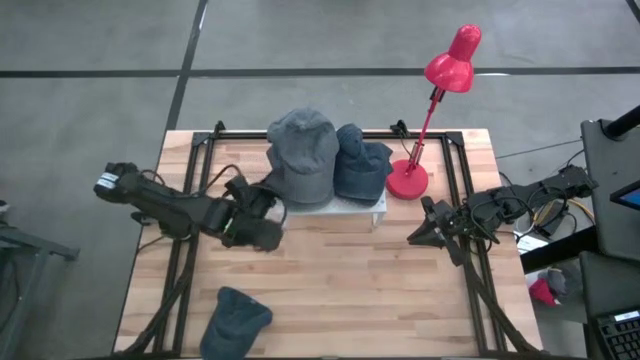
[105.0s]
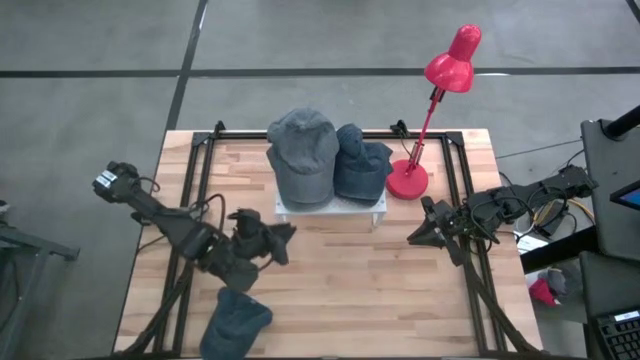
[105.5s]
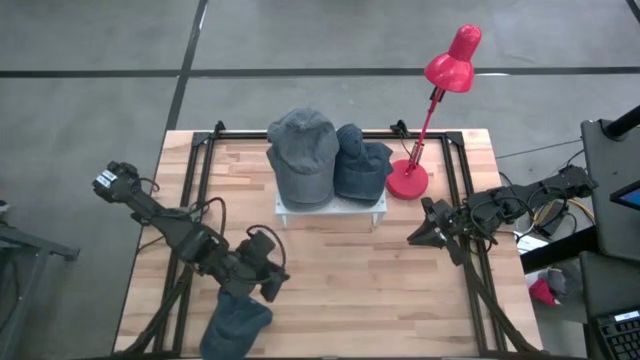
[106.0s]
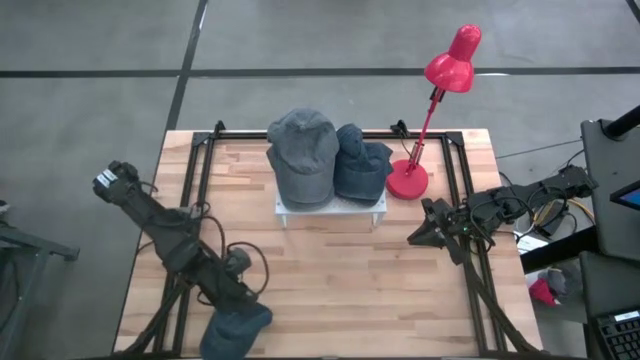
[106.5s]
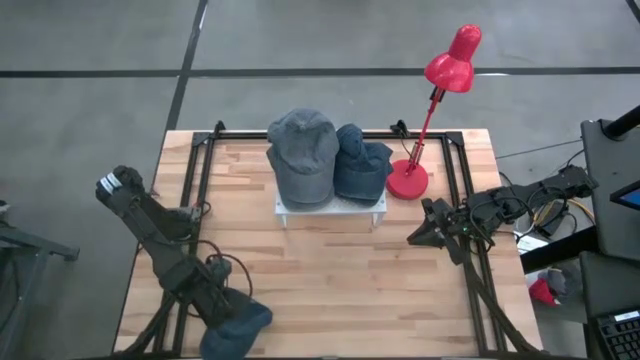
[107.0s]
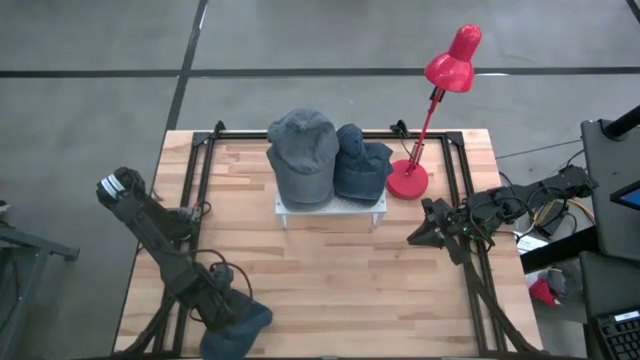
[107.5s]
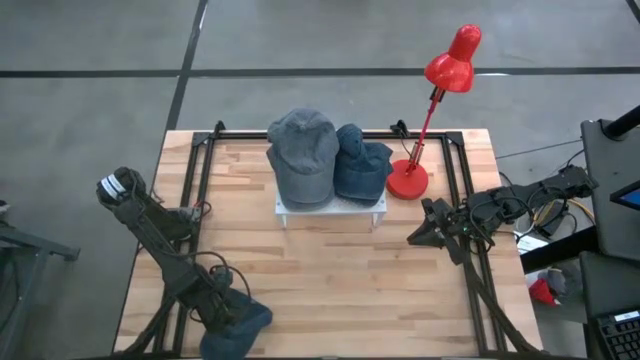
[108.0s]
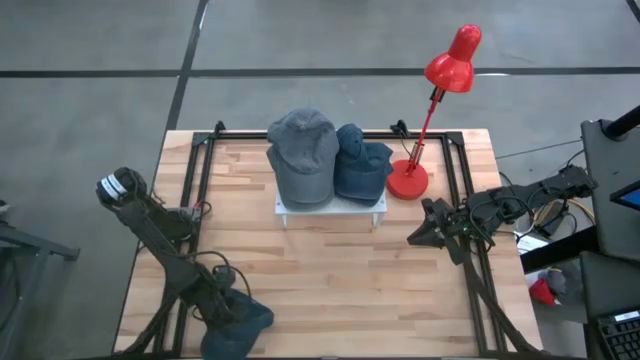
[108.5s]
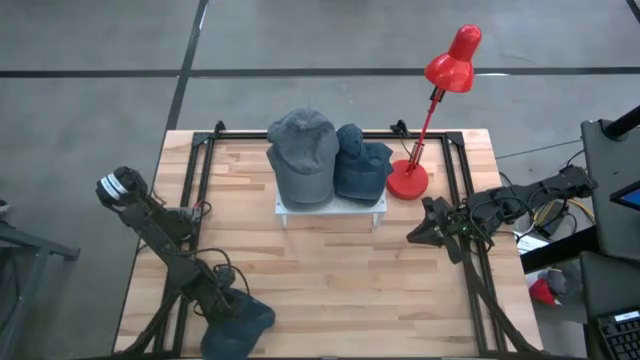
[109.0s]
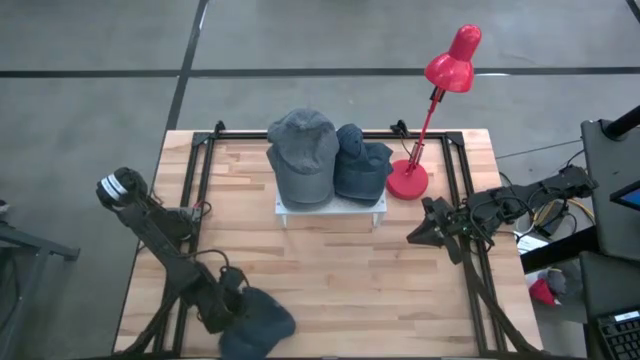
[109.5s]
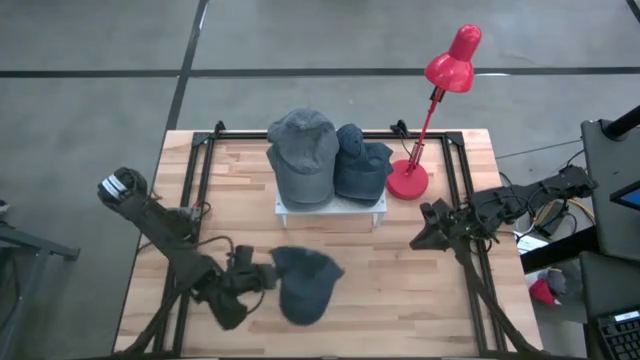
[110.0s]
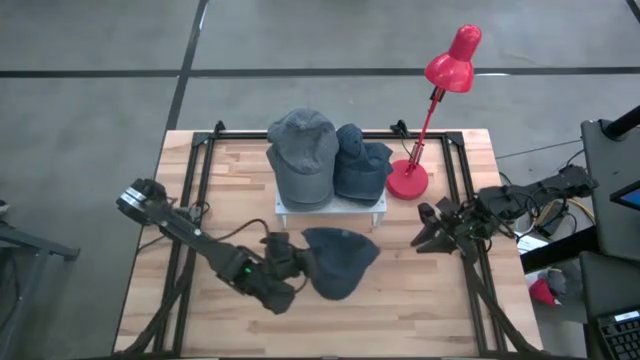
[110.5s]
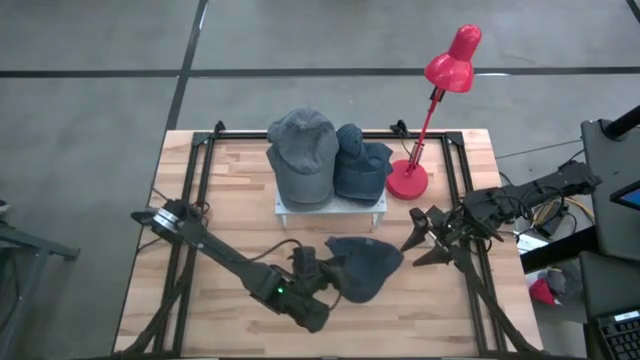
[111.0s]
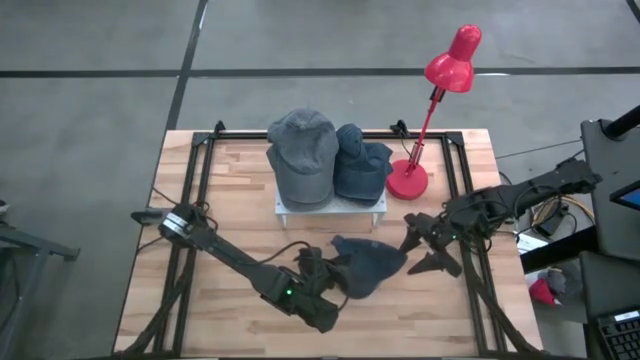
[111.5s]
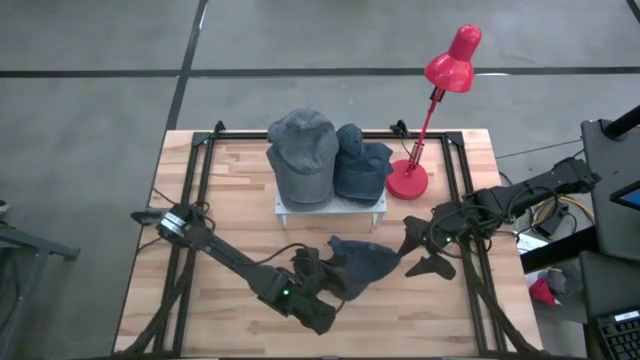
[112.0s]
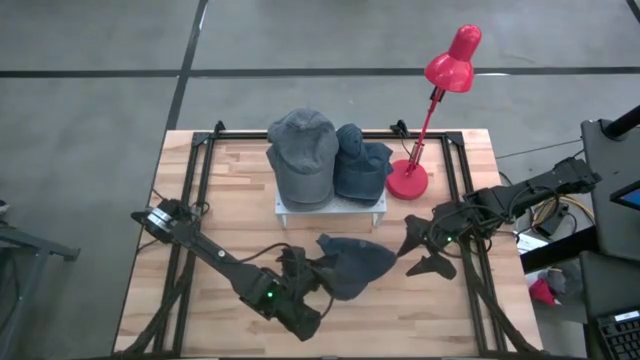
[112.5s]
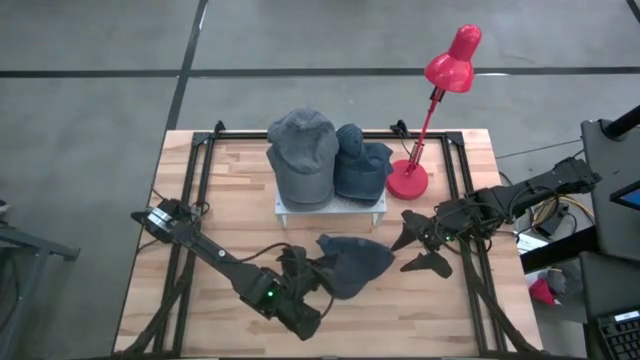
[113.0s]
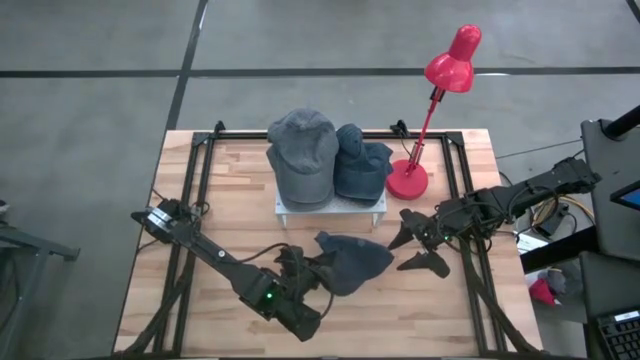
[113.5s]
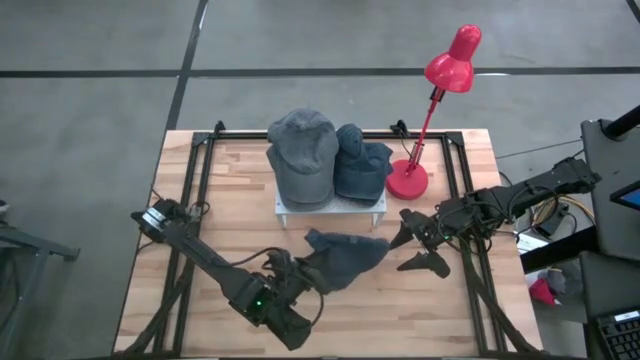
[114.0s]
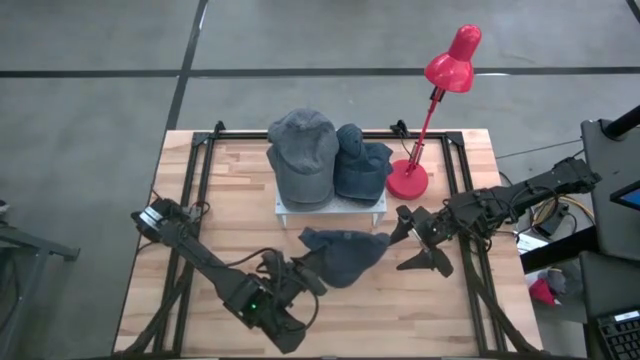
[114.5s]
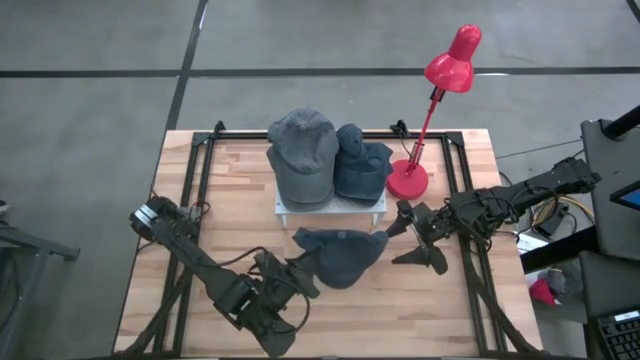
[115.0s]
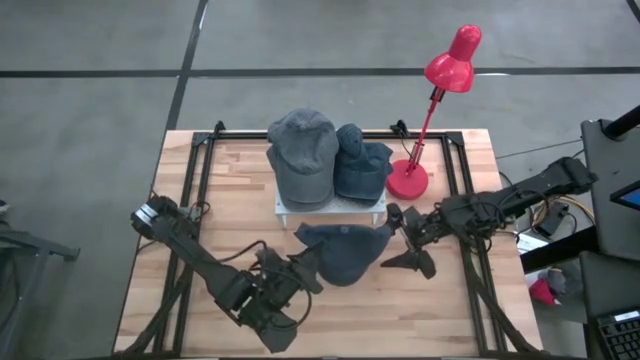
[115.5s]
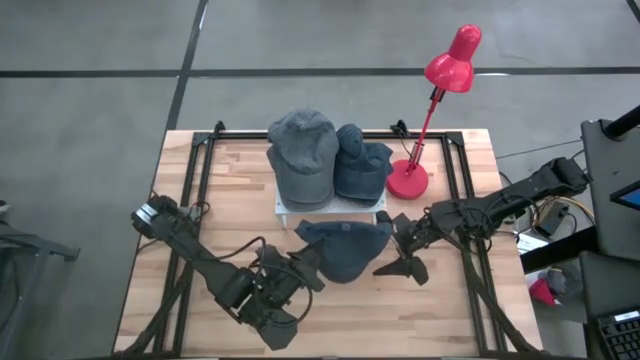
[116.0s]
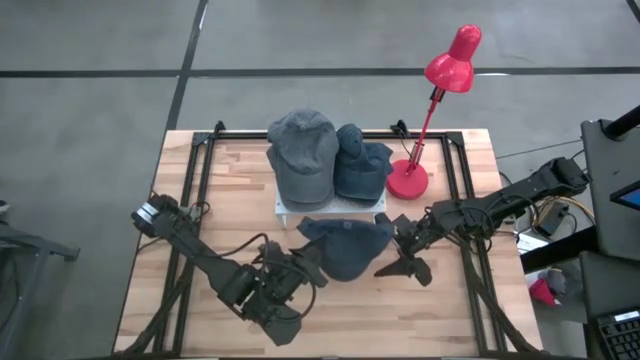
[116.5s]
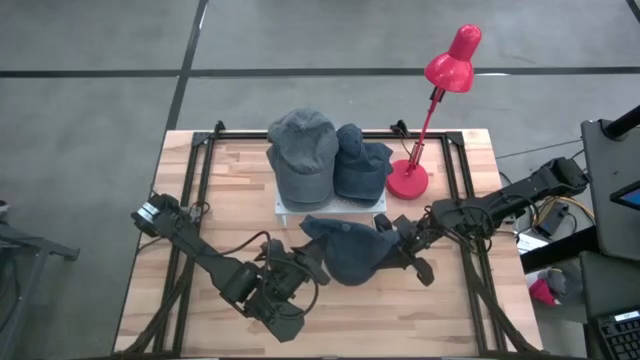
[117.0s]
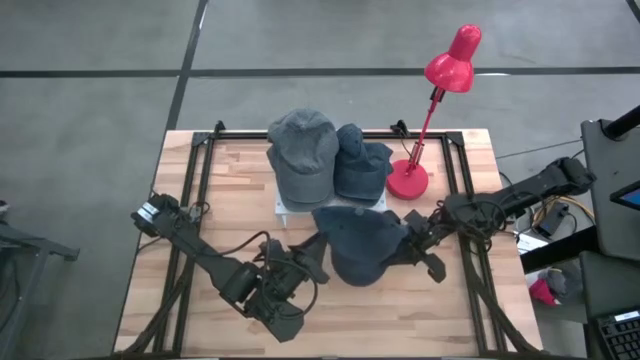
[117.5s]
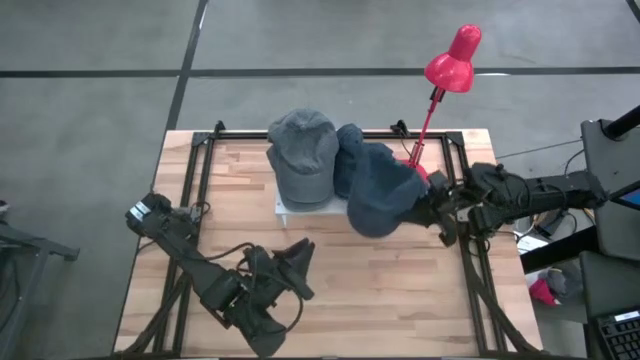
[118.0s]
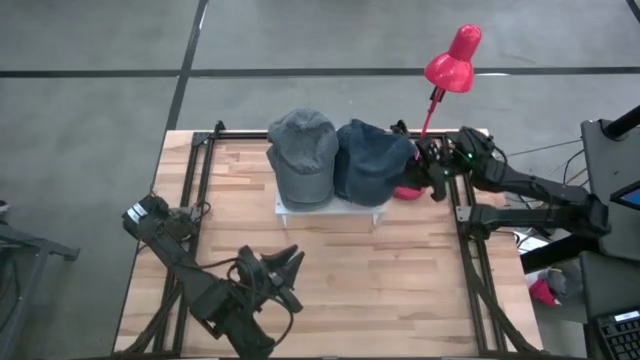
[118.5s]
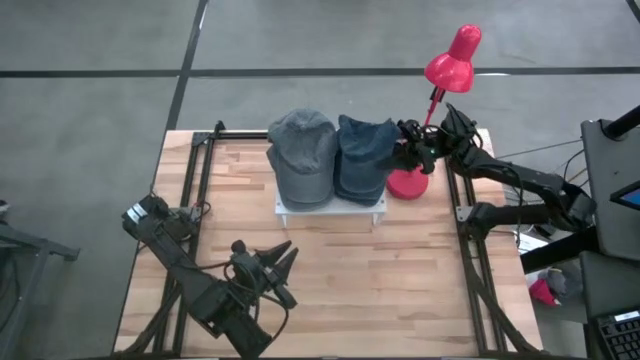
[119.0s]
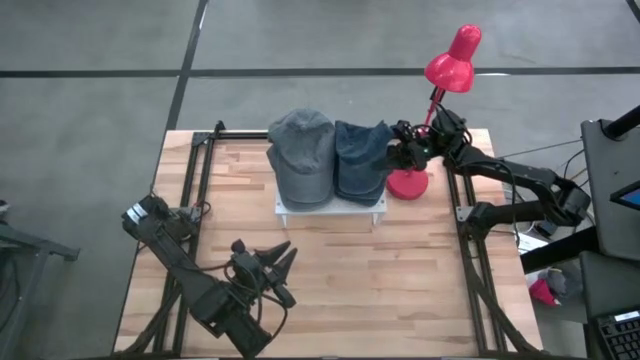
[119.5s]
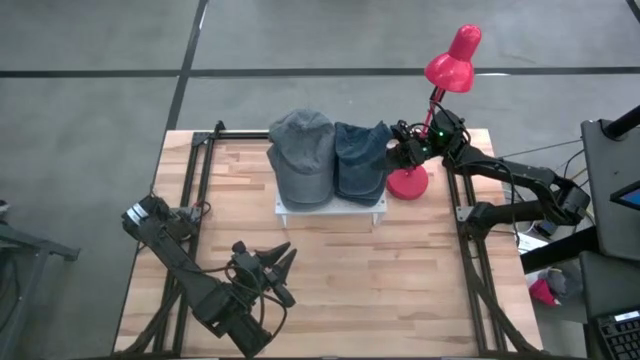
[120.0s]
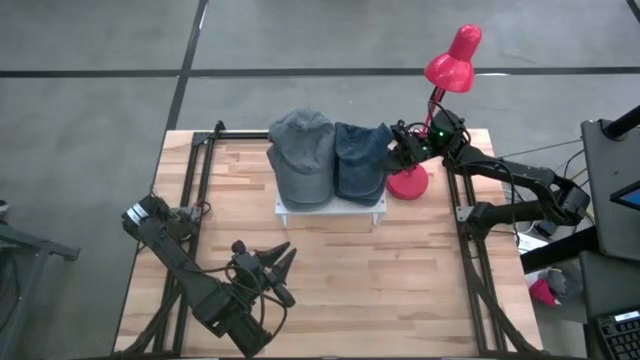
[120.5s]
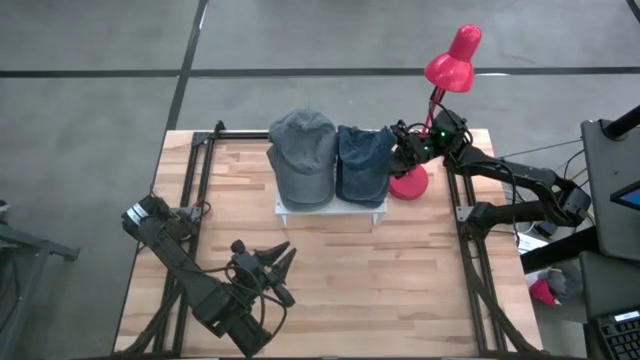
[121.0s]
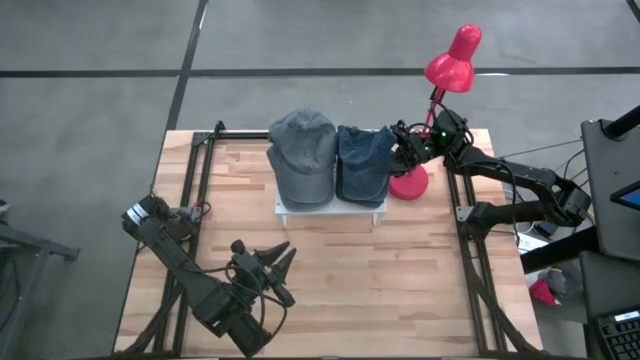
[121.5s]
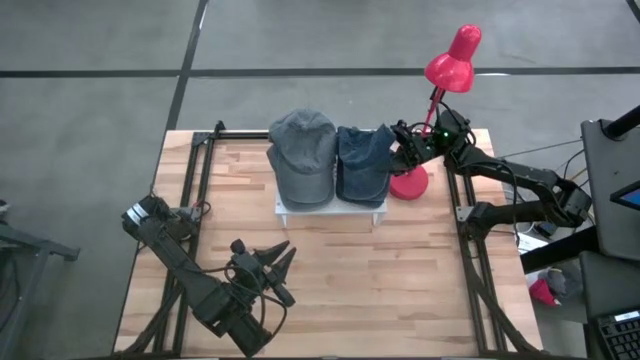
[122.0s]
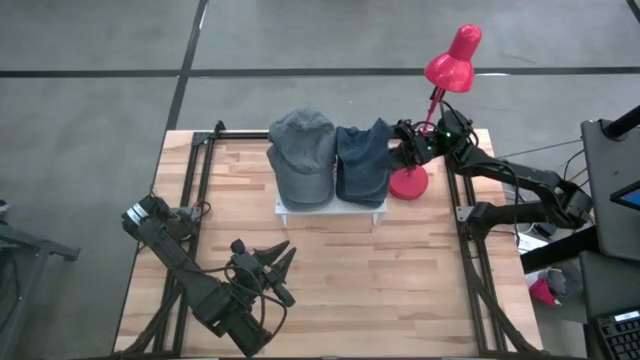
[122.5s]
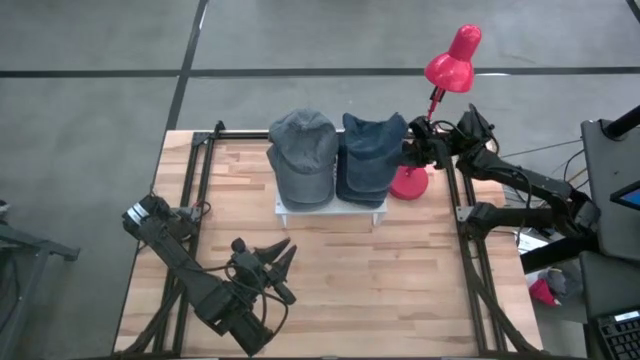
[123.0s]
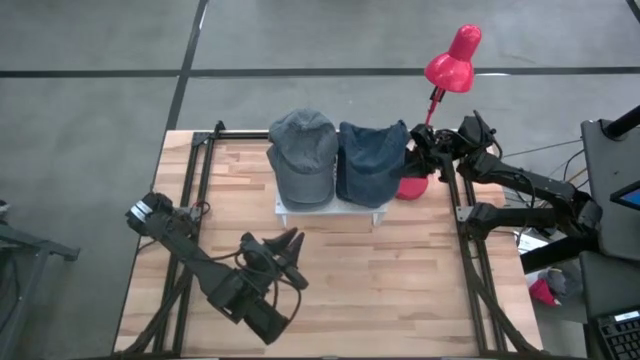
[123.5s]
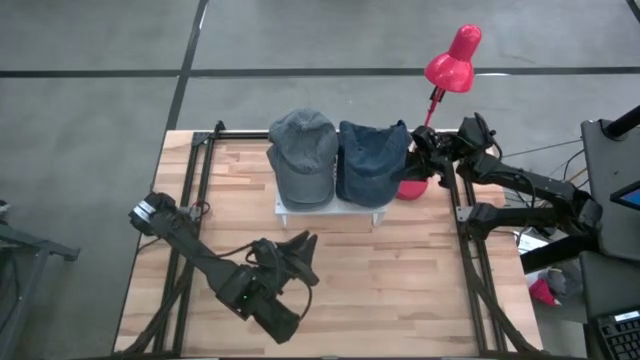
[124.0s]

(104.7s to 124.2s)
Task: Pick & Place hat
Stack the blue cap on the blue caps on the shelf

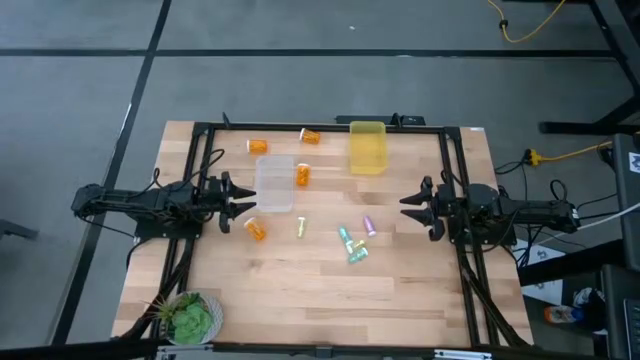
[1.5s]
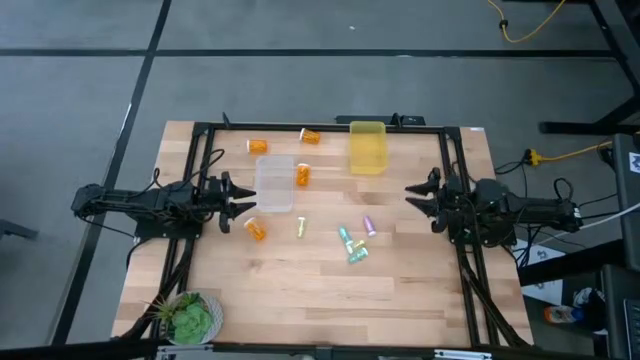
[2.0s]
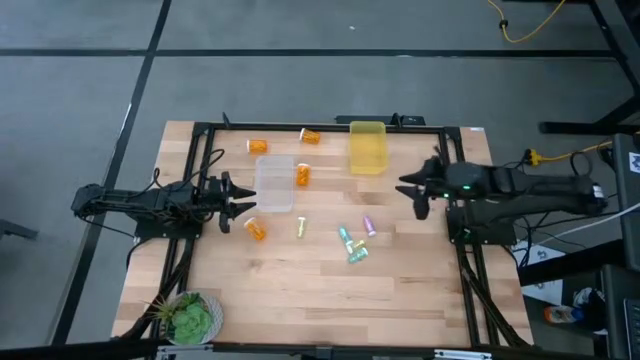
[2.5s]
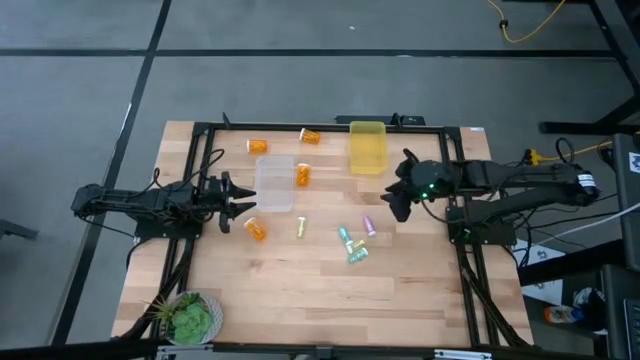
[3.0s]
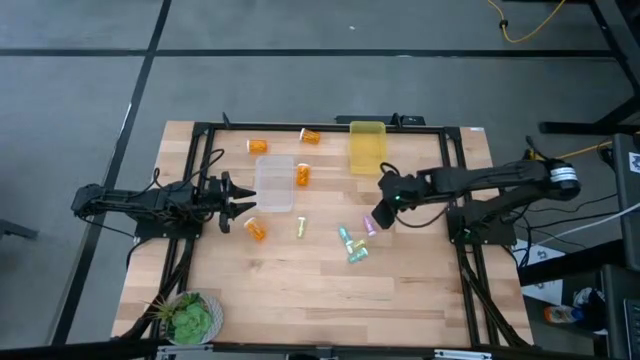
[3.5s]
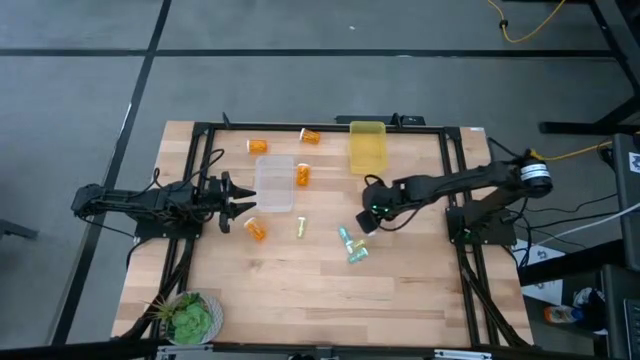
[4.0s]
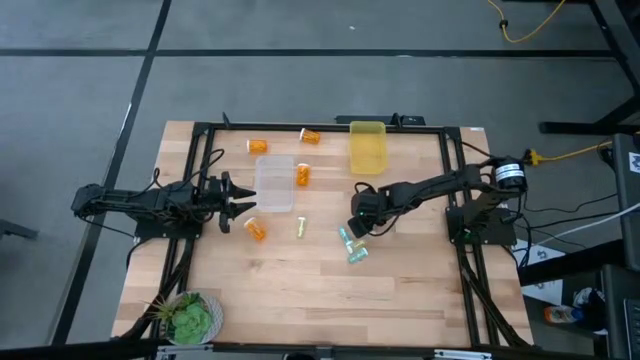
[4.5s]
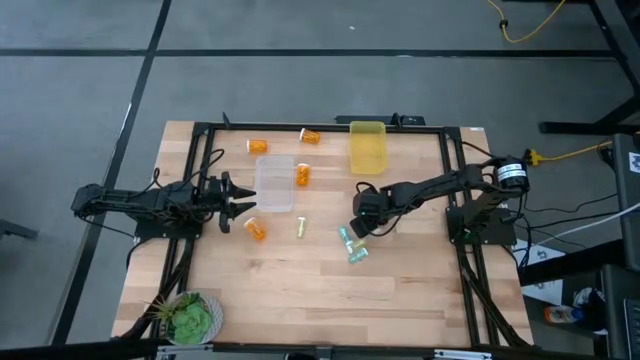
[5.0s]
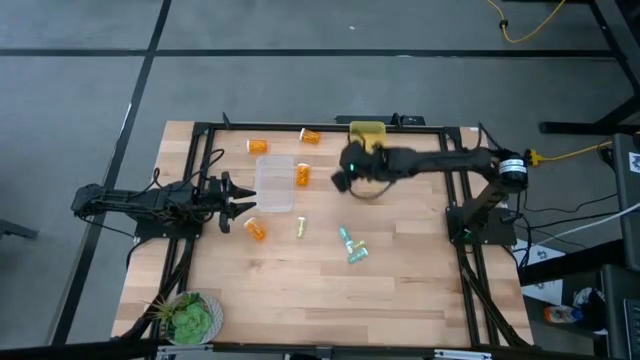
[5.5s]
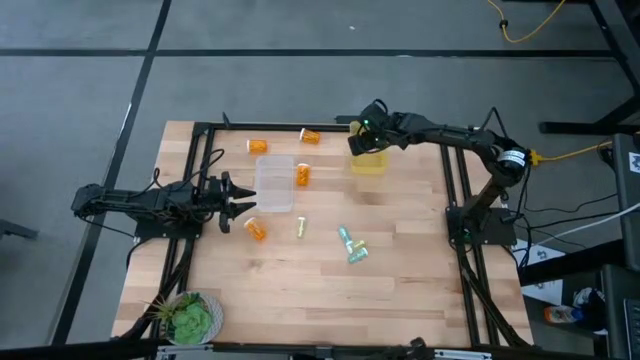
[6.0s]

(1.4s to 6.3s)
Task: Pick and place medicine bottles into bin by pill shape (circle, oval)
Put the small pink pill bottle into the yellow bin
